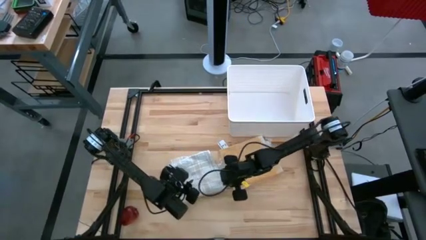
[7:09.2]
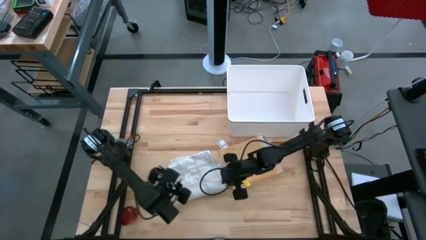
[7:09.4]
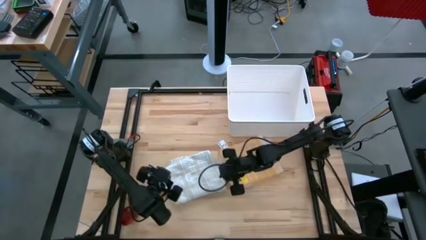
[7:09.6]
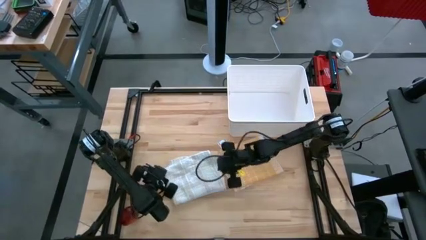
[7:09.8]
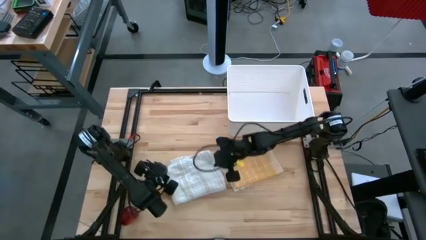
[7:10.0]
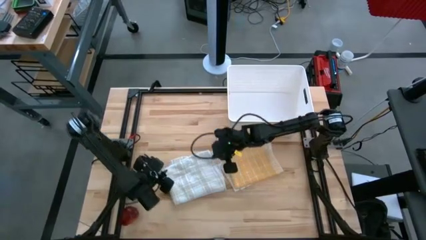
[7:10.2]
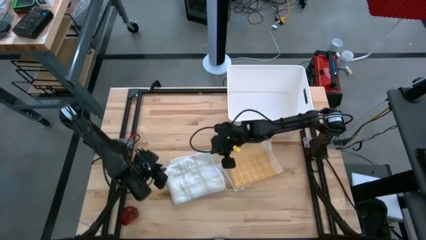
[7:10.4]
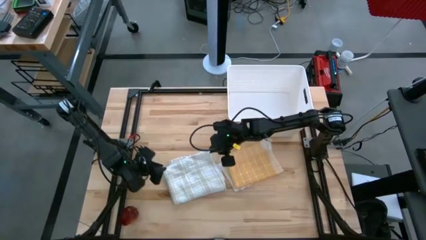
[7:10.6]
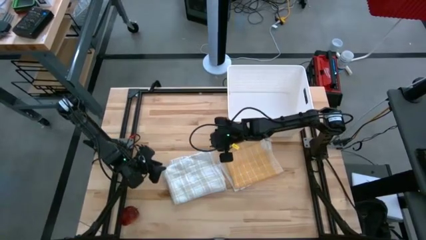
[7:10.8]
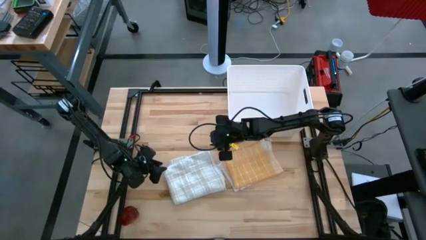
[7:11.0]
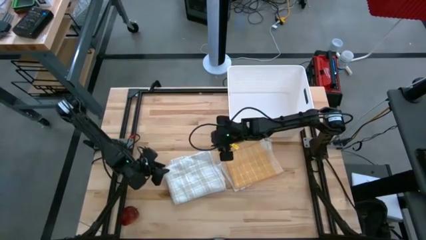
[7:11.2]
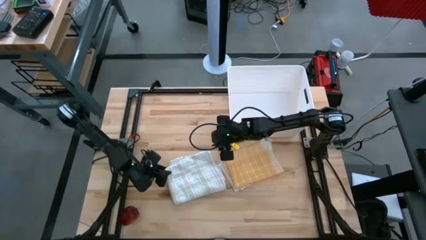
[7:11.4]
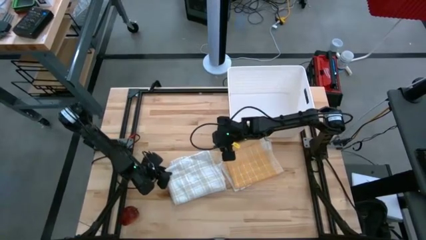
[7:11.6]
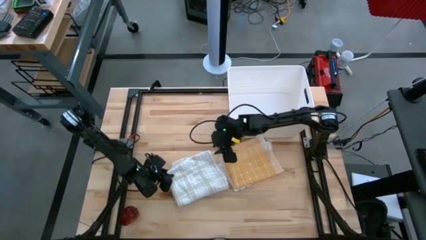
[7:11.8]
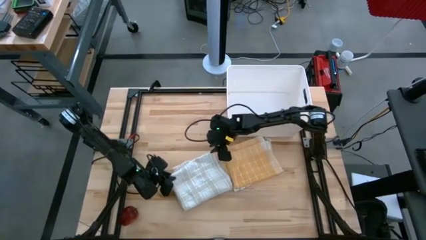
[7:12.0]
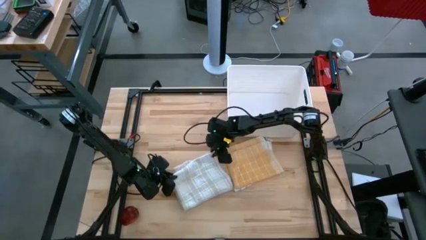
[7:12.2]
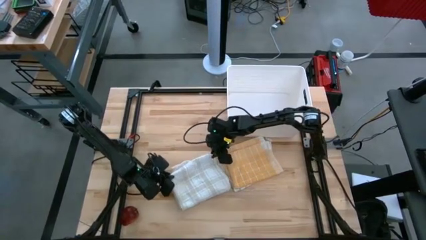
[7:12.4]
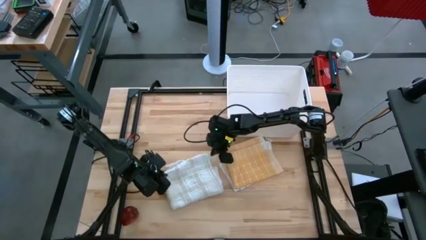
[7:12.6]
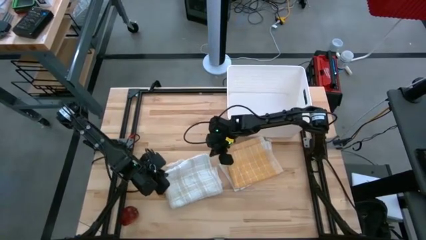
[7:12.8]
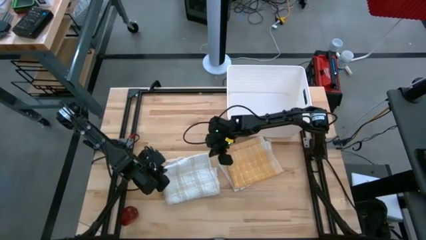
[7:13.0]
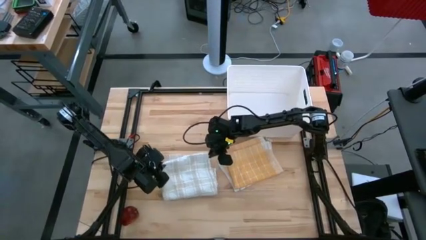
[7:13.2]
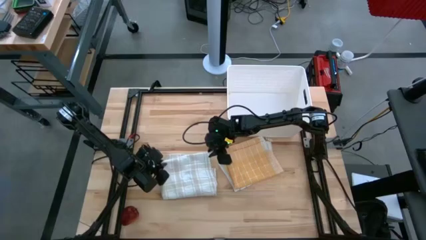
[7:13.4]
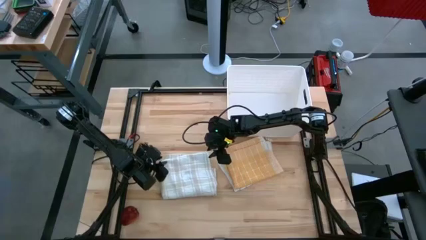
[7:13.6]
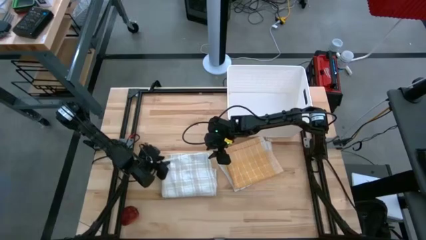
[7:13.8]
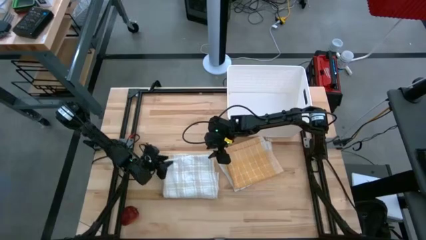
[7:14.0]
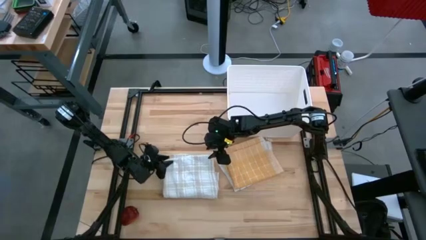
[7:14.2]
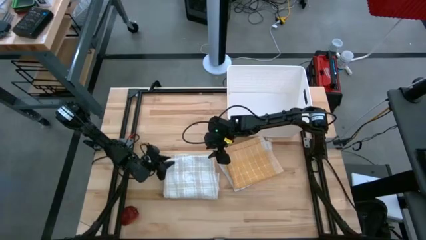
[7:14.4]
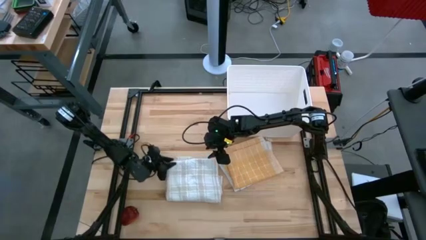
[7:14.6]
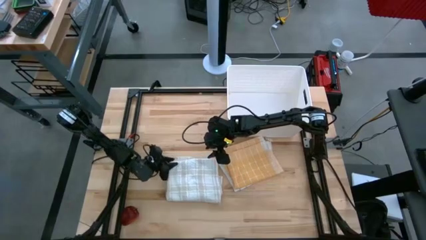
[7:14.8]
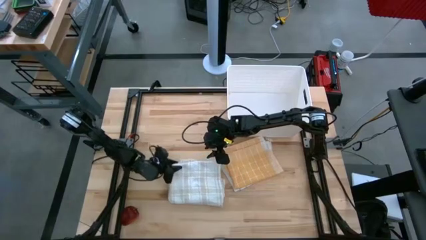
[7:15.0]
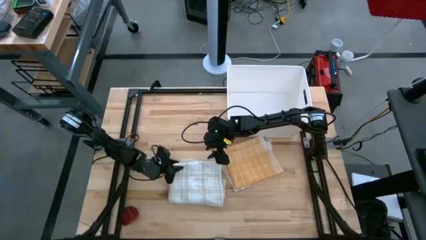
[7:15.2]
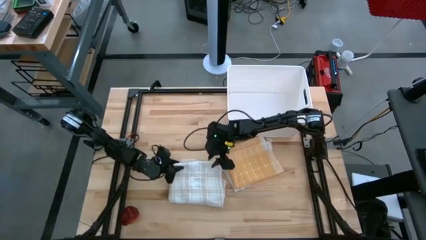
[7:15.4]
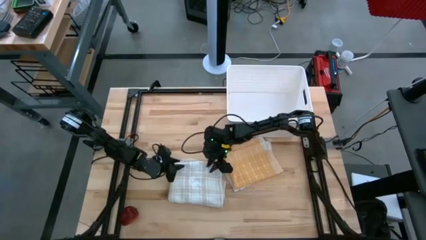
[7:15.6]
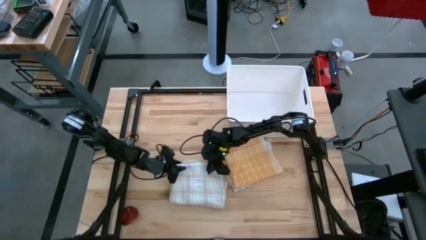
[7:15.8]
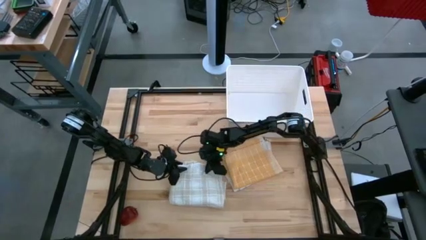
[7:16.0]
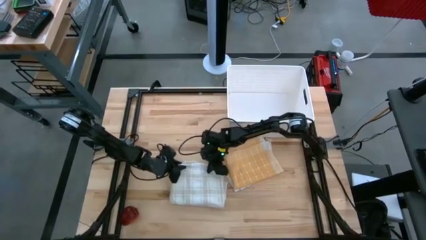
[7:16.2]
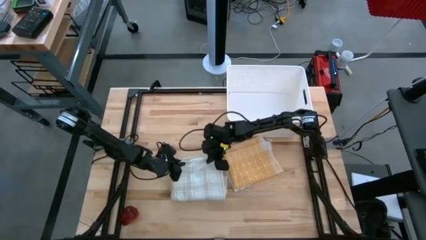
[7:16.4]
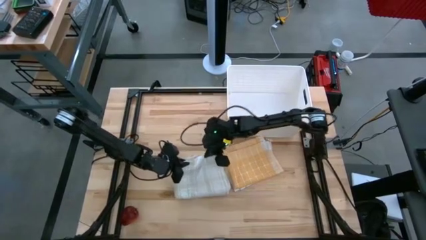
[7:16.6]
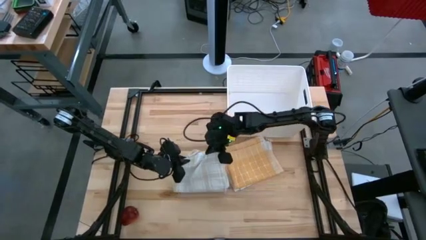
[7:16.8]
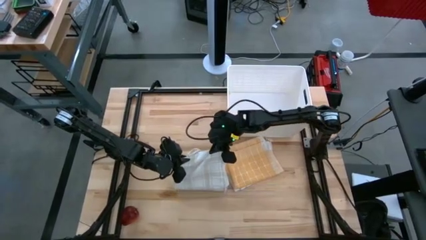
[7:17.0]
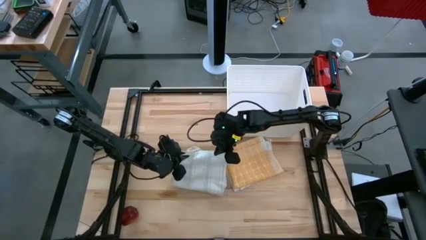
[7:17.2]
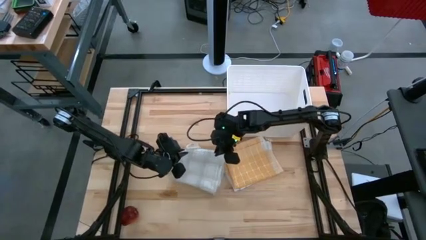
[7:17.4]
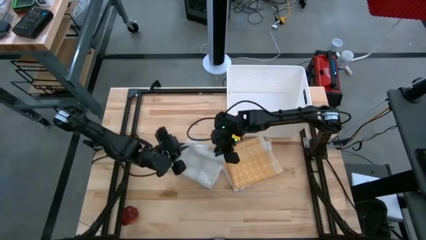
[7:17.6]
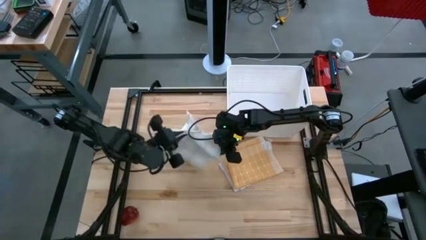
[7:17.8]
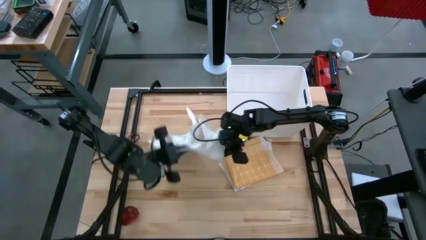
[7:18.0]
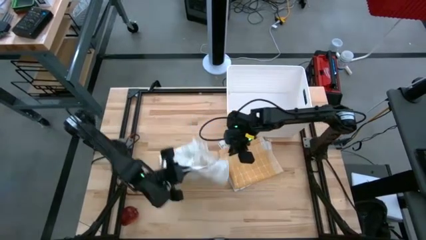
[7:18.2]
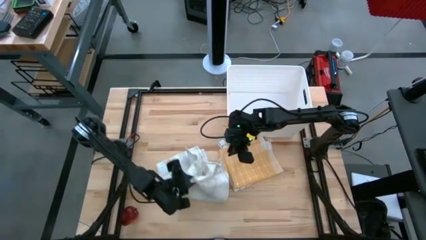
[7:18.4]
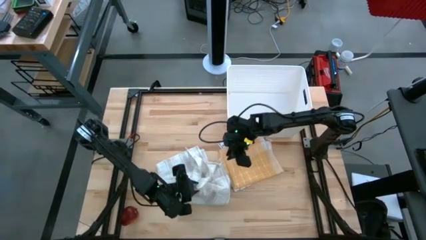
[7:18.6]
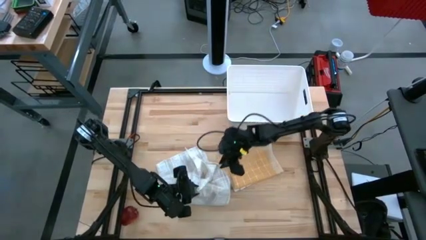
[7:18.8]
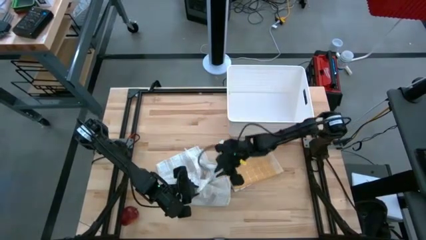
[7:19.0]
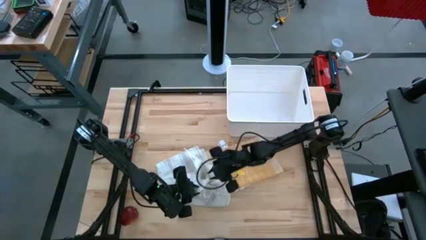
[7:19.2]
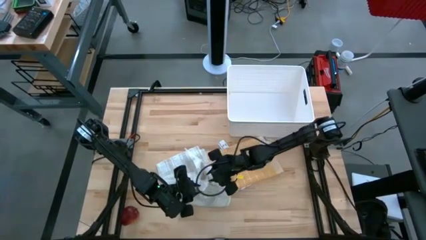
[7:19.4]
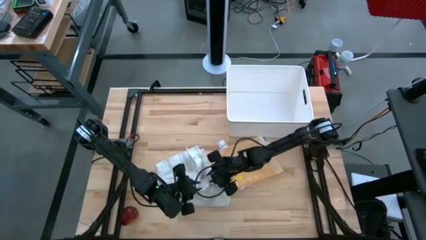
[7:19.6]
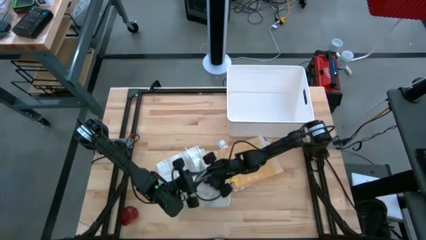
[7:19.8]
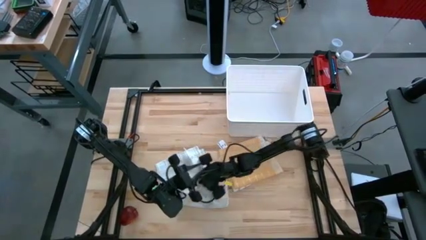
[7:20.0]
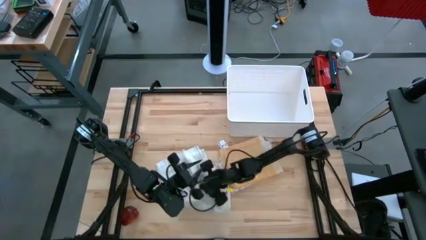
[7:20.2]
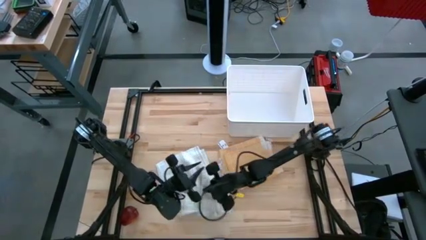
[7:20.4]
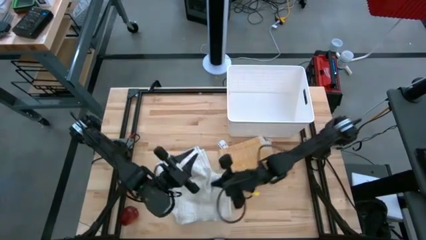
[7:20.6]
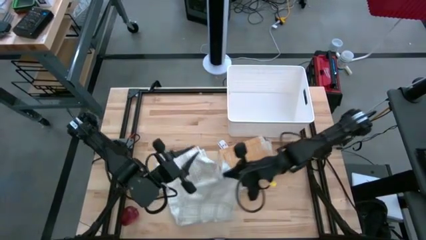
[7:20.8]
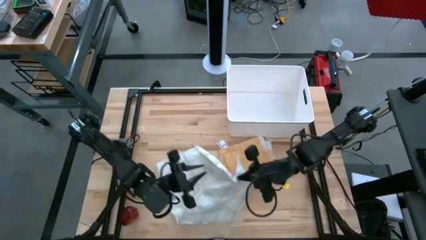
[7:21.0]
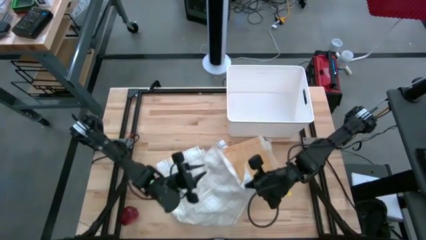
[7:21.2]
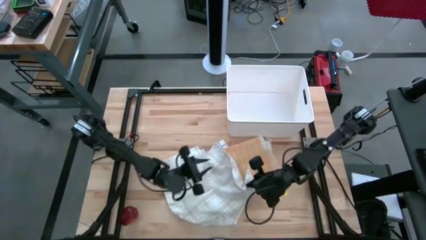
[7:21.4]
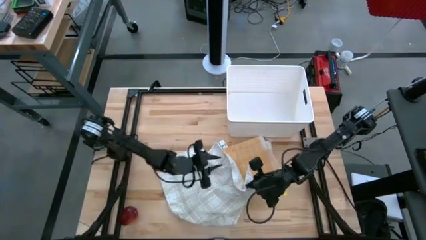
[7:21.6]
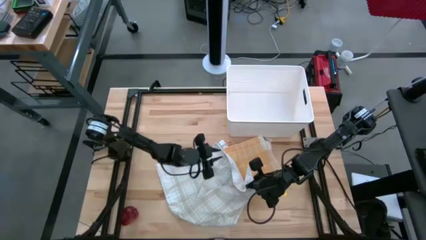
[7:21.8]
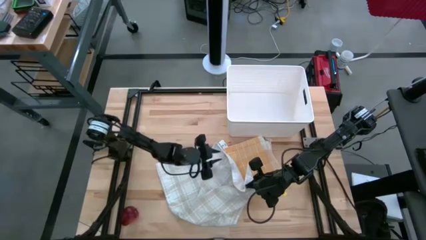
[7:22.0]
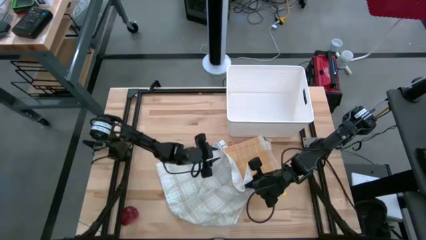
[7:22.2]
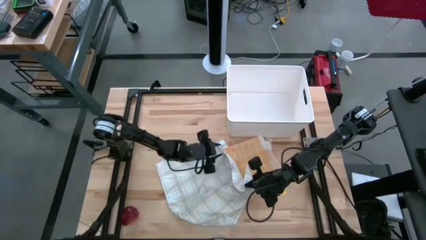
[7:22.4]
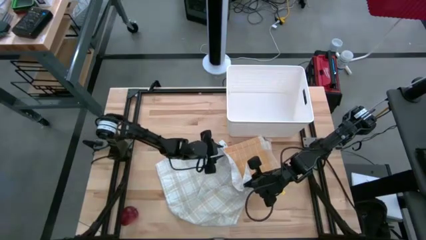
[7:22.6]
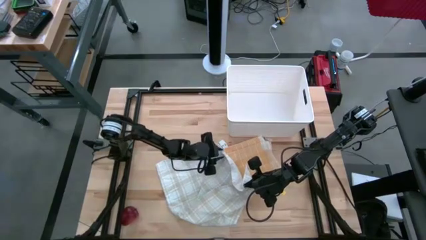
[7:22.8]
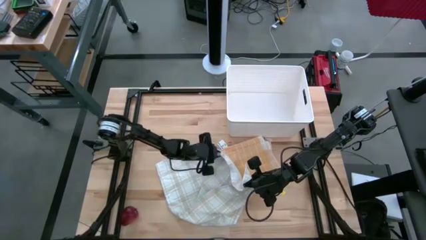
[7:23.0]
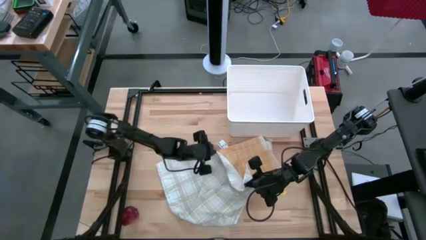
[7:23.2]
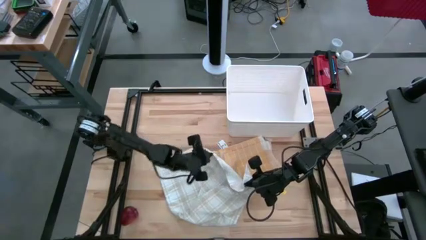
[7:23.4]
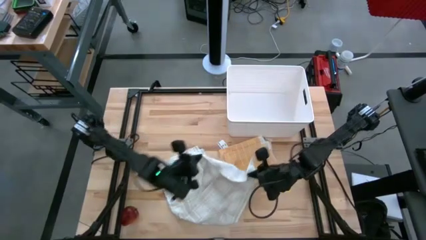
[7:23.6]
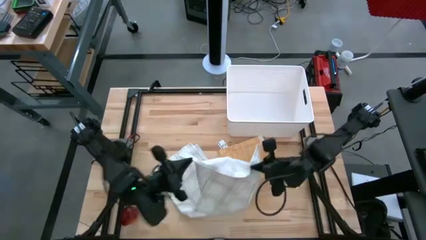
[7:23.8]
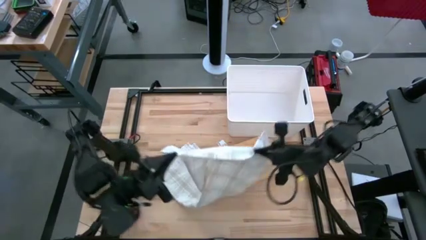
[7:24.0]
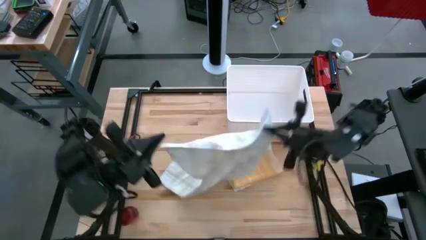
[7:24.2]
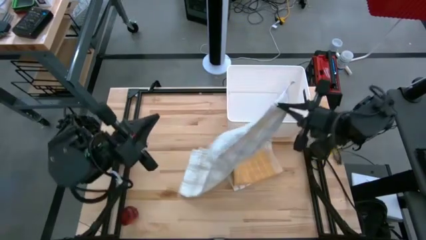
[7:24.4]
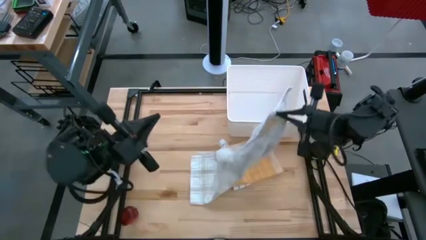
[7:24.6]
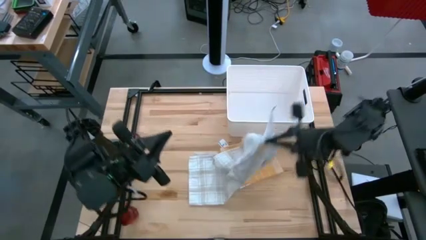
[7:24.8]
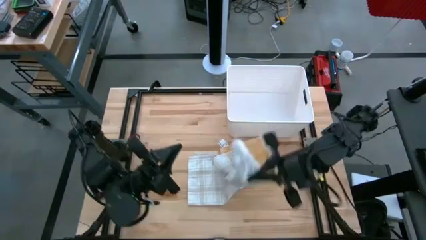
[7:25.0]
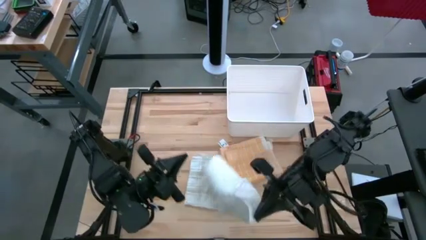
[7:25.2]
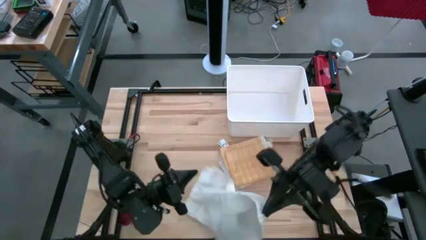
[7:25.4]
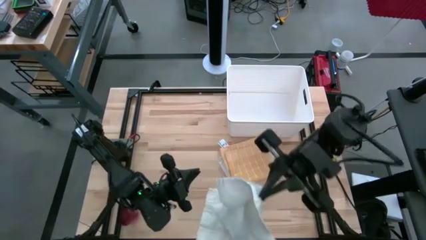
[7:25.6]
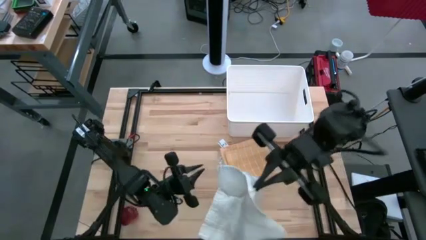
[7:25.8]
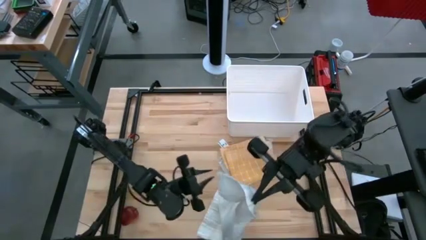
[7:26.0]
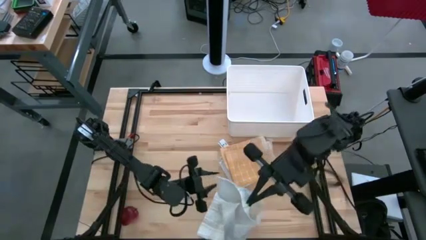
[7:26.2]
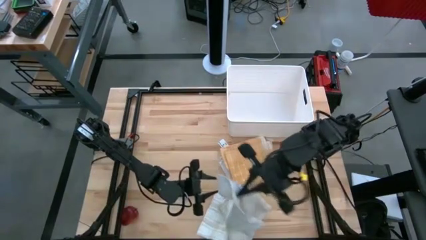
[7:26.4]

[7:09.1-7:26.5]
Task: Fold towel
Fold the white checkered towel
